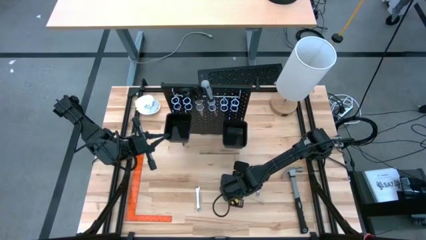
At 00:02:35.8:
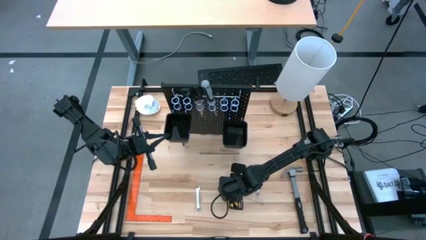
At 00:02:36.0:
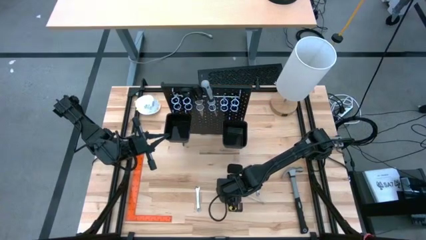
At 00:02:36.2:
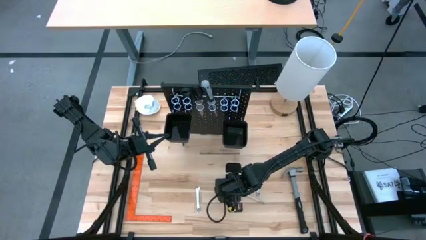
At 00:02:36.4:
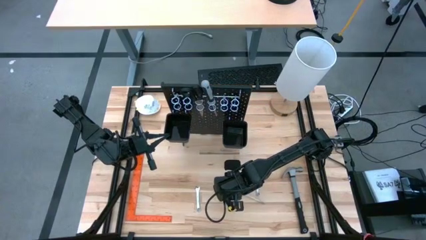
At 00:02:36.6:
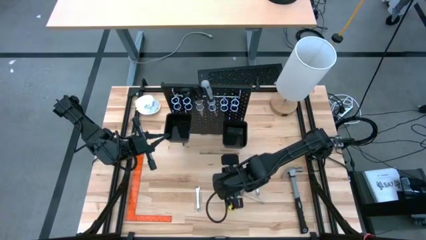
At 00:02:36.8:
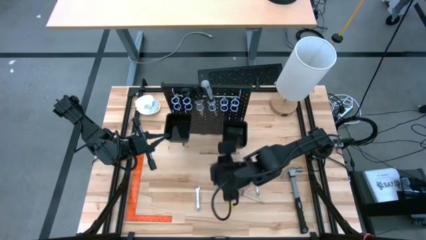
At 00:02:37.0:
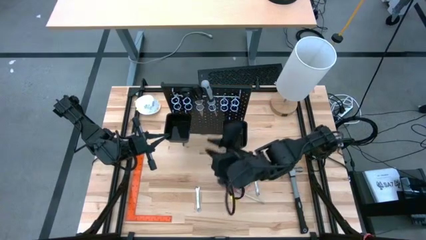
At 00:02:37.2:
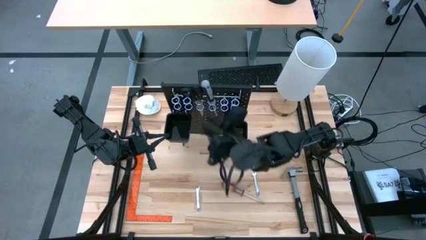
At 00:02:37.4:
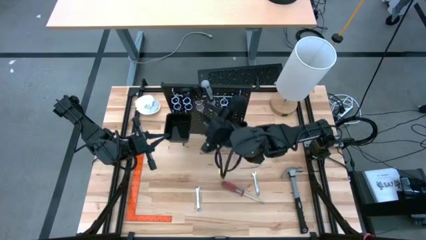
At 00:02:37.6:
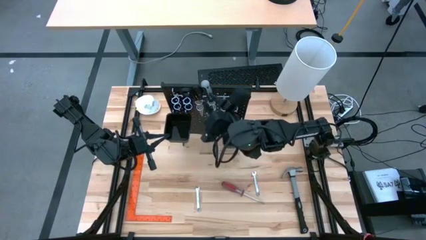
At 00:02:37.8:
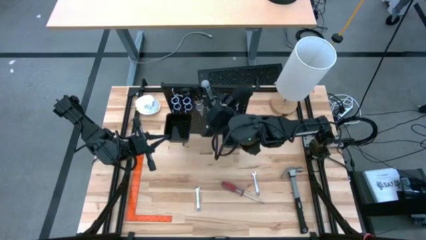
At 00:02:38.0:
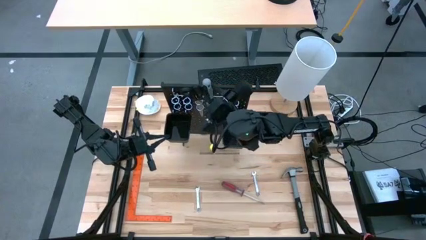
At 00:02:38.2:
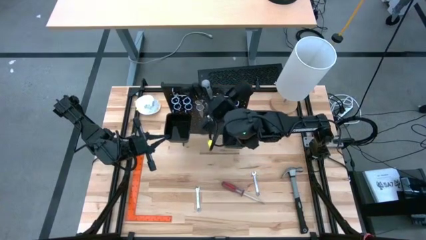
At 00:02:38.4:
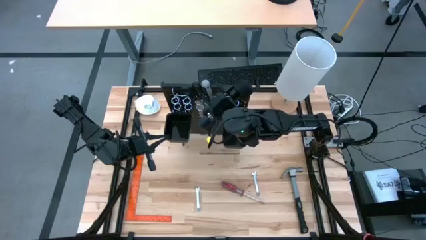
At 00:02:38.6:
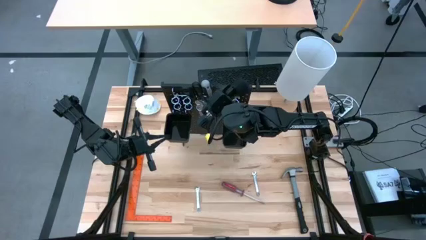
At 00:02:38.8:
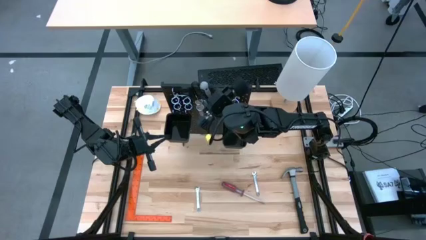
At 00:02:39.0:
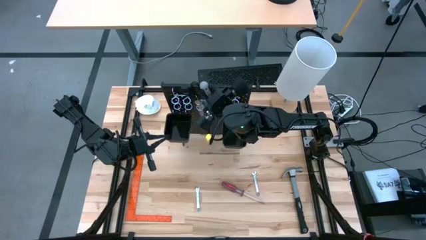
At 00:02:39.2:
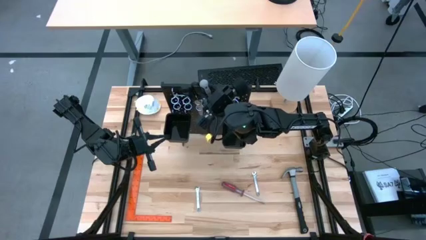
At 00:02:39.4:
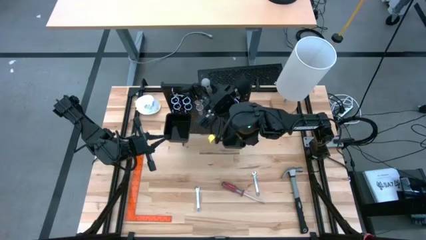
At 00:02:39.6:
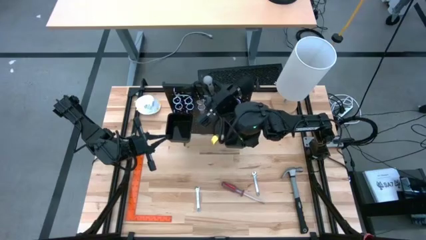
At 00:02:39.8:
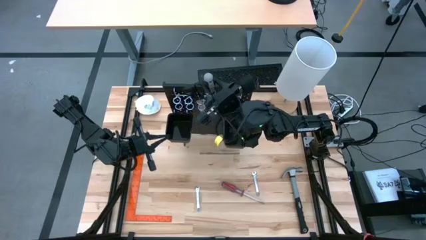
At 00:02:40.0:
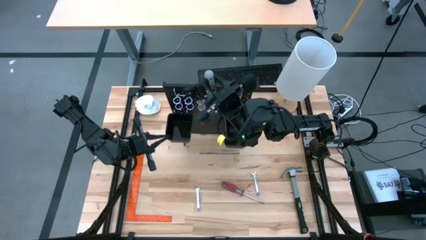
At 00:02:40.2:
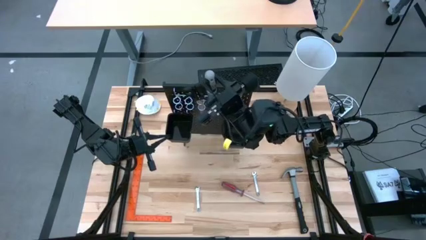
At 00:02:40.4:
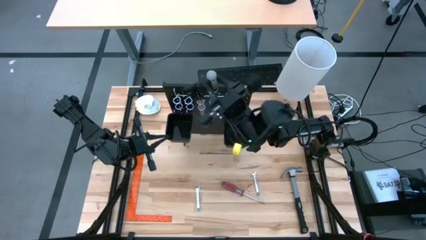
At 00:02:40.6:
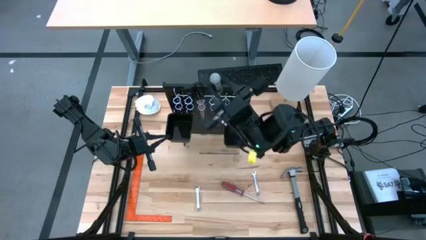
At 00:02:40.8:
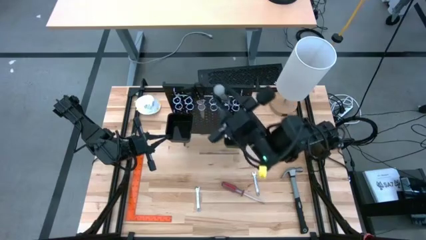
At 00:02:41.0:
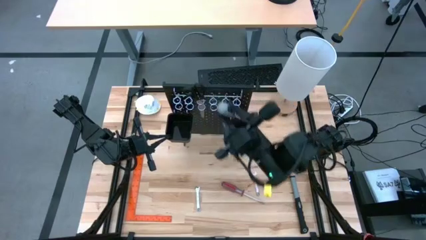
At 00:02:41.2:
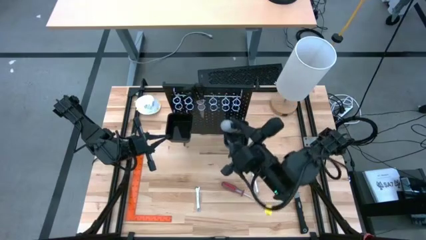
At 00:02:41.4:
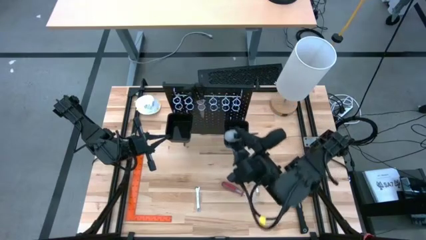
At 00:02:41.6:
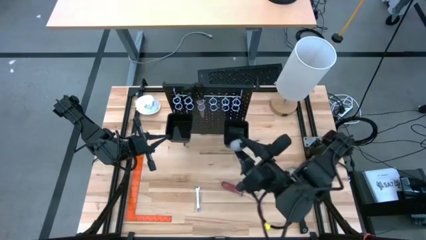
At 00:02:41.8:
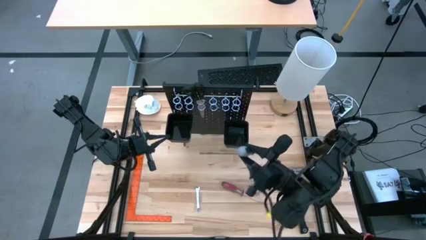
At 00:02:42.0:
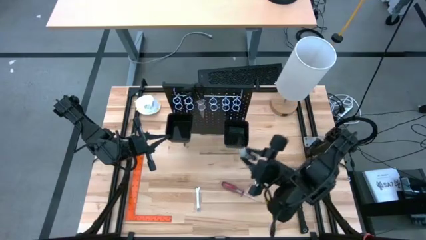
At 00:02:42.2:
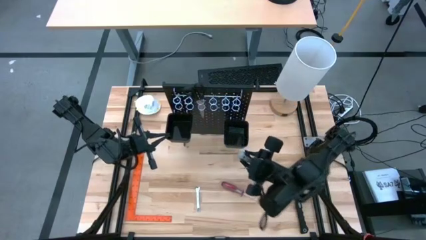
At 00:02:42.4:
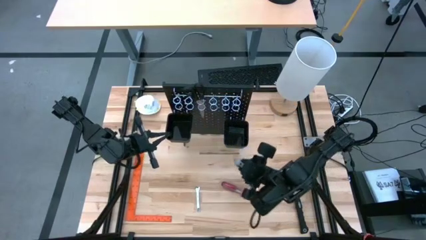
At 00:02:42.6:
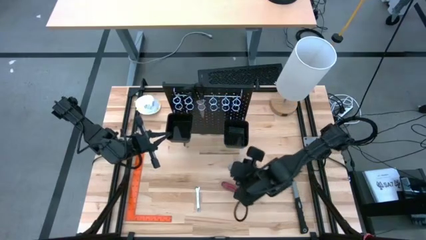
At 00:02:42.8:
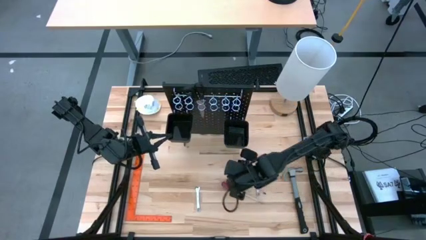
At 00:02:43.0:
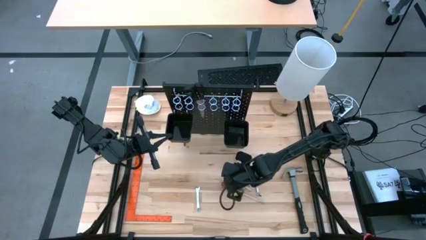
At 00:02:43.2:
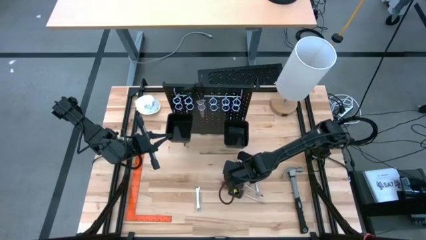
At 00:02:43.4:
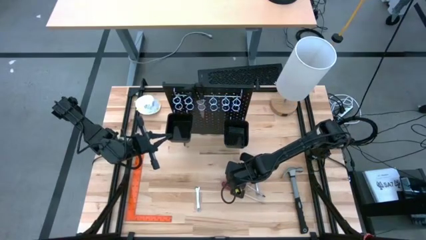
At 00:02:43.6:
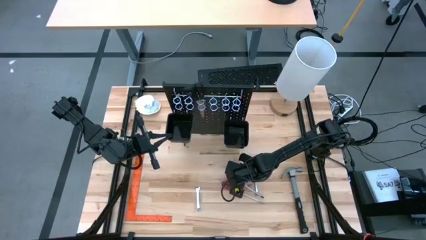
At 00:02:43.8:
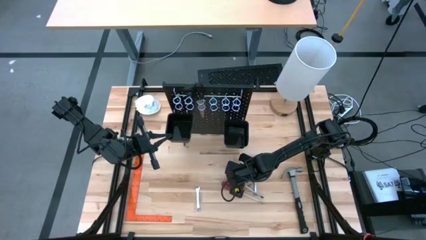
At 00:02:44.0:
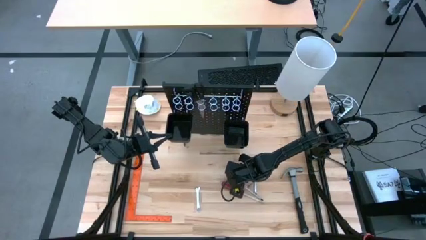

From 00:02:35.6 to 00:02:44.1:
Task: Hang tools onto peg board
Remove the gray screwdriver from the black peg board

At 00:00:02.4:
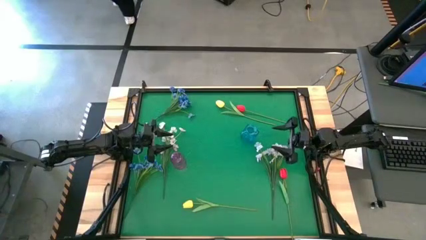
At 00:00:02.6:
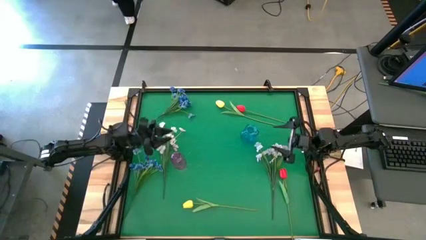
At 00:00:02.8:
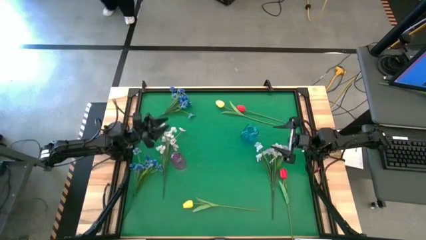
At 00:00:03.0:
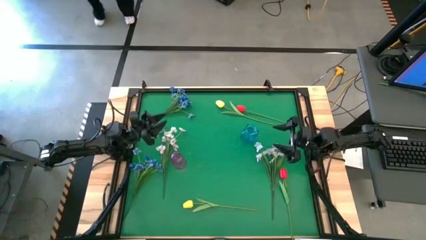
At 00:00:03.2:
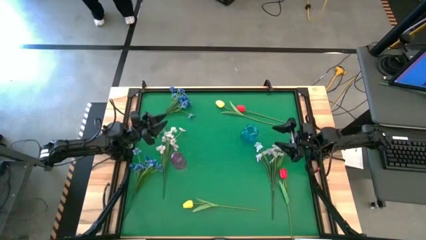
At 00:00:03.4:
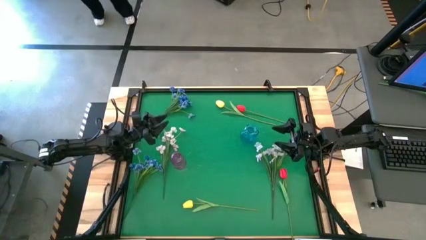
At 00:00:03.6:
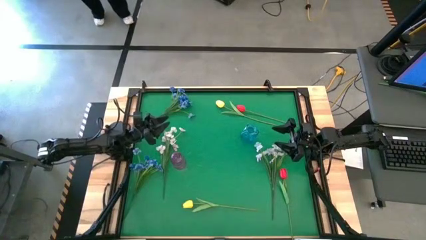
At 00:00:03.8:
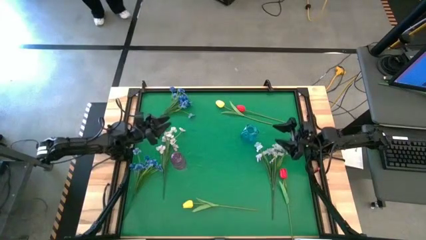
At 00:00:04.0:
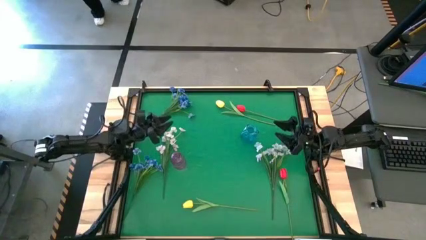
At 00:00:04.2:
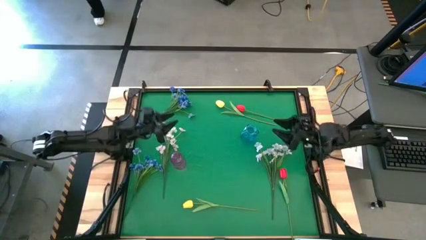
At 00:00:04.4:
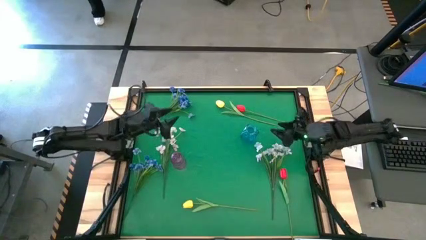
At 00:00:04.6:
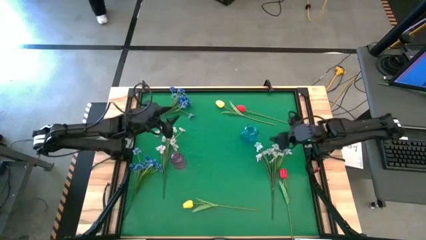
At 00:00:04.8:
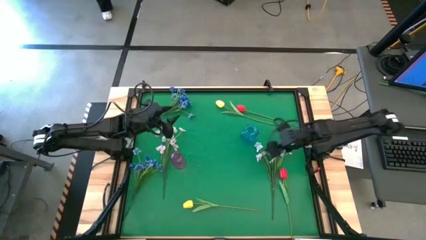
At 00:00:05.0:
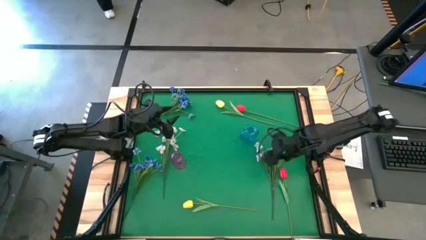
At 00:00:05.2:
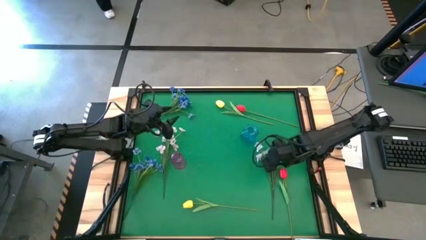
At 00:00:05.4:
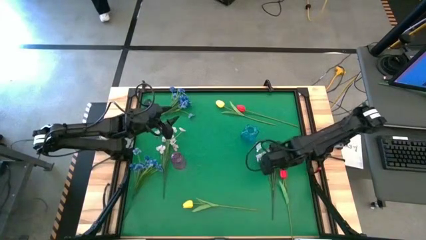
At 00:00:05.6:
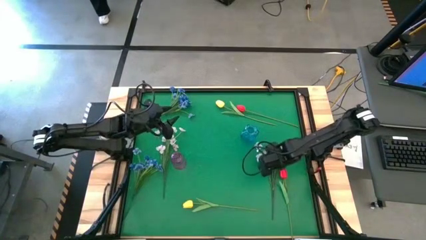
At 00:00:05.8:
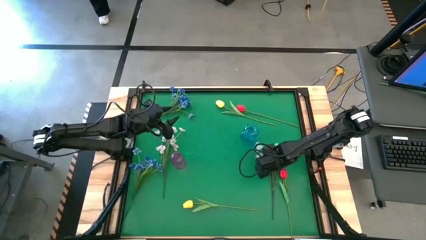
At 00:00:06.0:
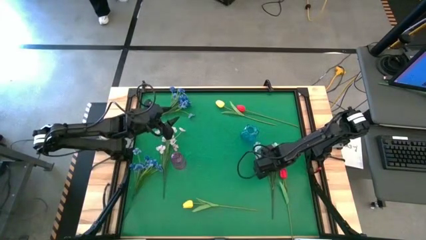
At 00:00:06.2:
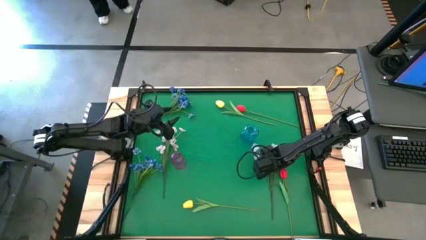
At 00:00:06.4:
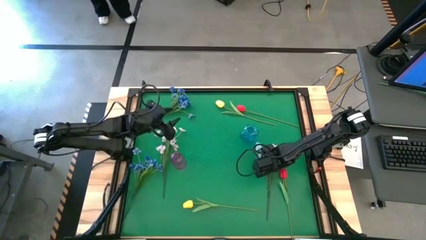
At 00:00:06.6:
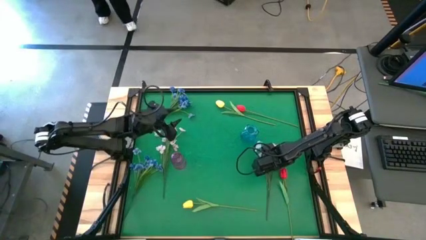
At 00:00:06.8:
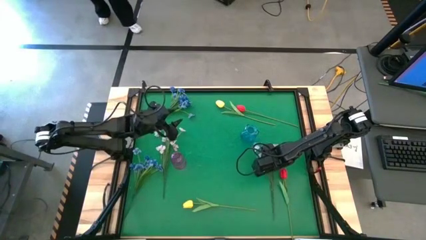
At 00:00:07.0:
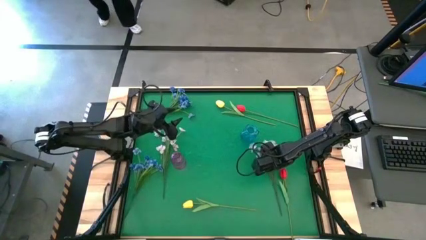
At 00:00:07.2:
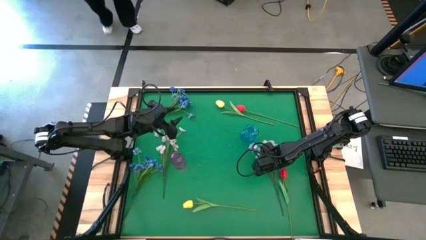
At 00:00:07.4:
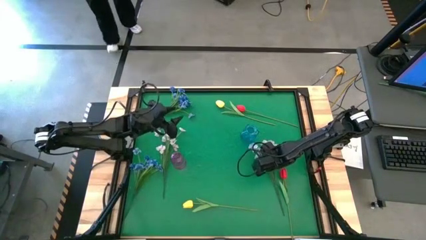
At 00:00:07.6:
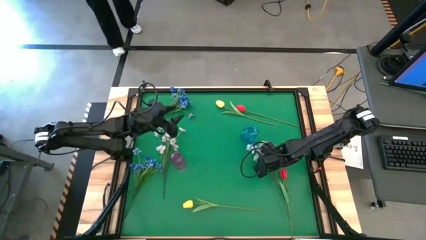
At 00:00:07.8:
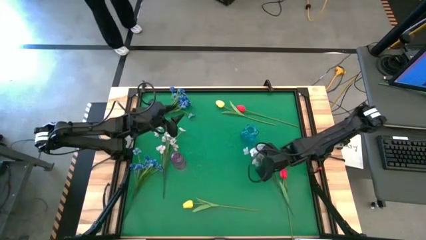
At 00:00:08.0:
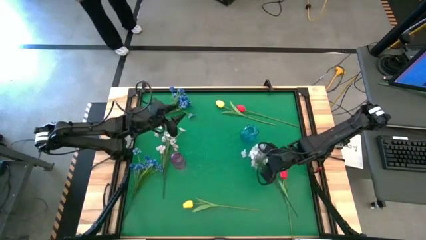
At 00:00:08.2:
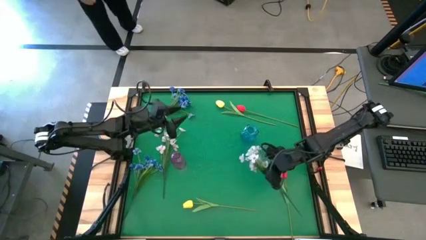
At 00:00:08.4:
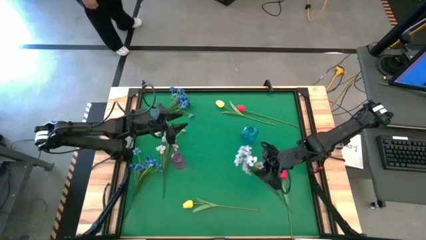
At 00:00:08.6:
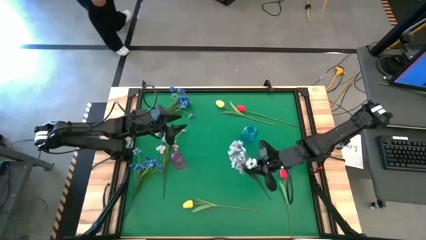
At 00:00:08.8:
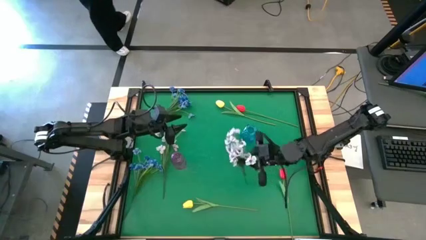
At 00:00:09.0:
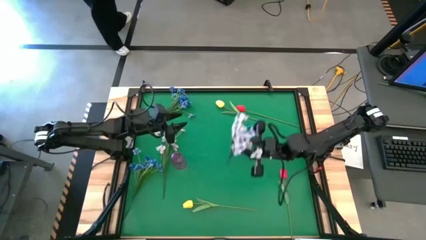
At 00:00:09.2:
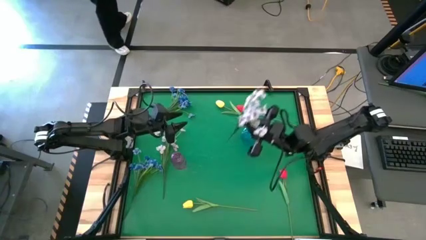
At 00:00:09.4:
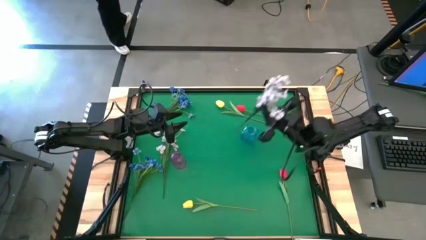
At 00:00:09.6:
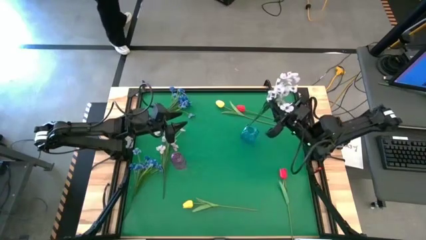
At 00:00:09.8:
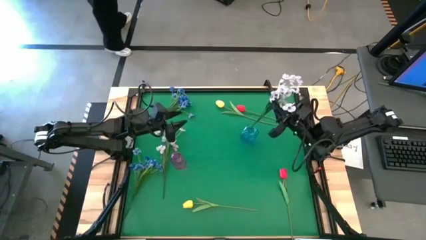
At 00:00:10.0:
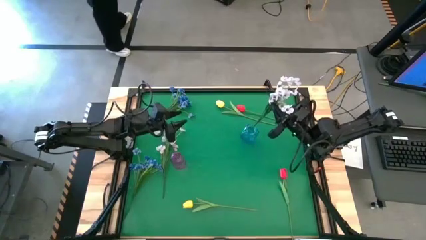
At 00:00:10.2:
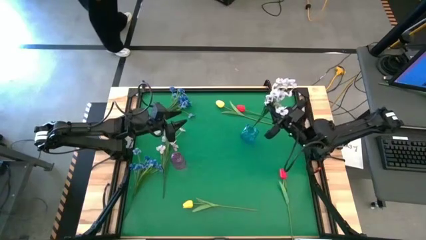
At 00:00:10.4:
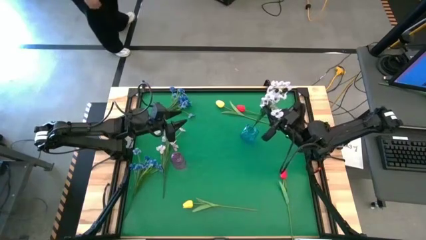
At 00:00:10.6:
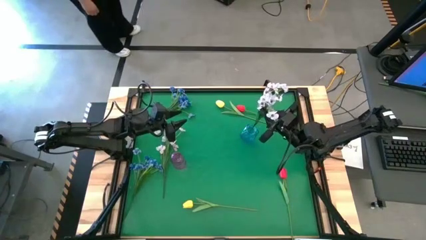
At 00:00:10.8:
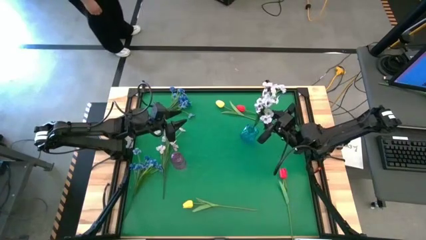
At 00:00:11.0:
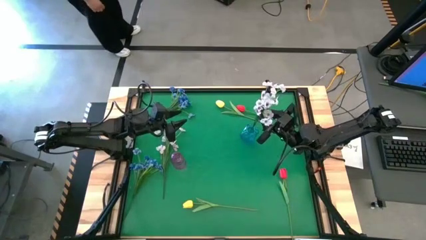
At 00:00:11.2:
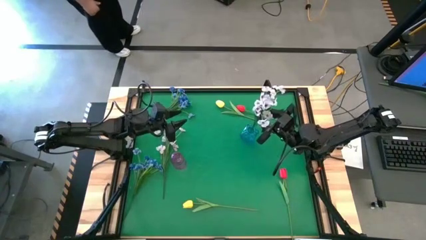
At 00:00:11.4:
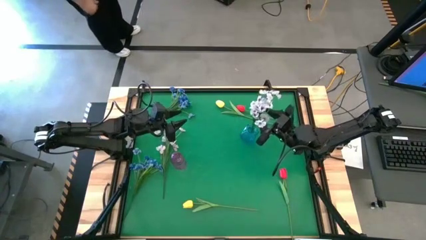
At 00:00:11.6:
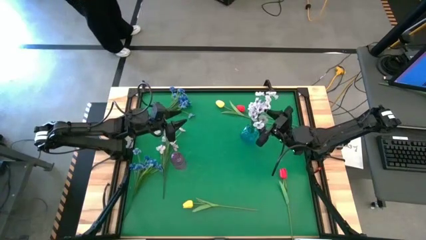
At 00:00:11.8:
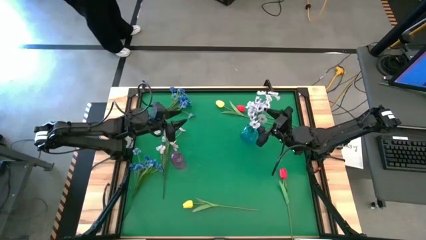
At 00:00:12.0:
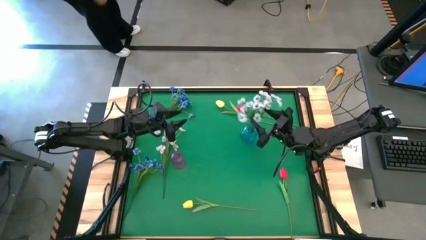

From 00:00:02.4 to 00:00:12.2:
Task: Sort flowers into vase by color
Put the right white flowers into the blue vase
